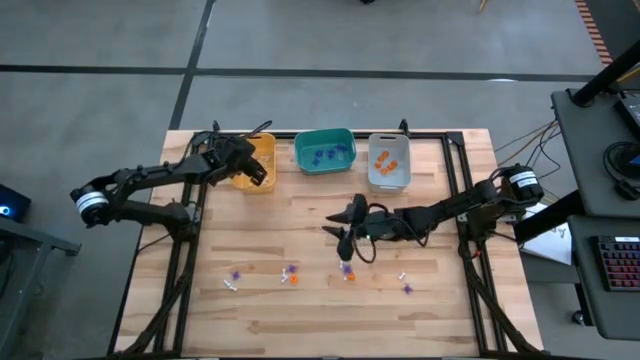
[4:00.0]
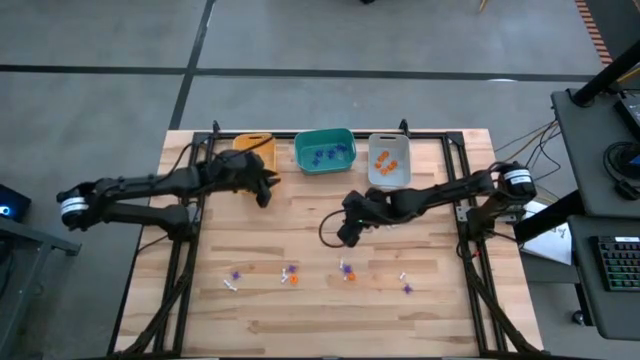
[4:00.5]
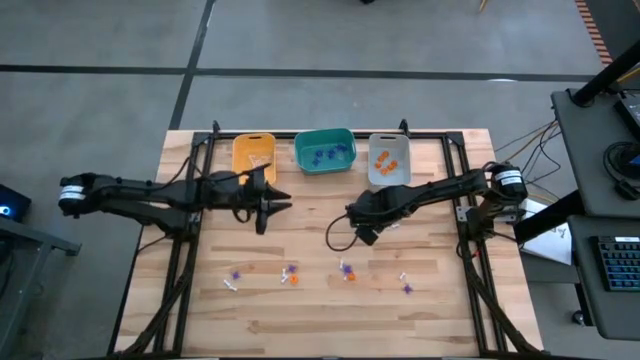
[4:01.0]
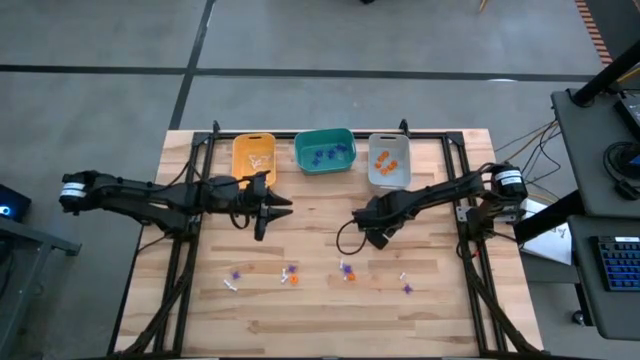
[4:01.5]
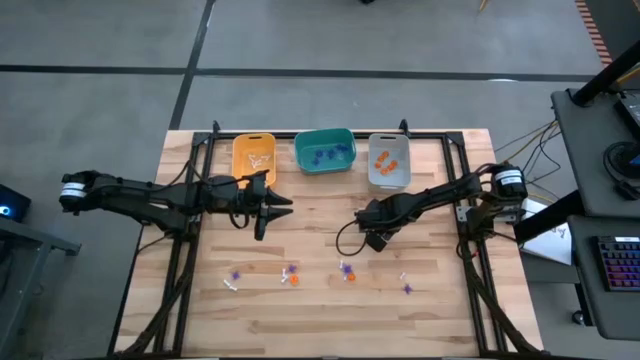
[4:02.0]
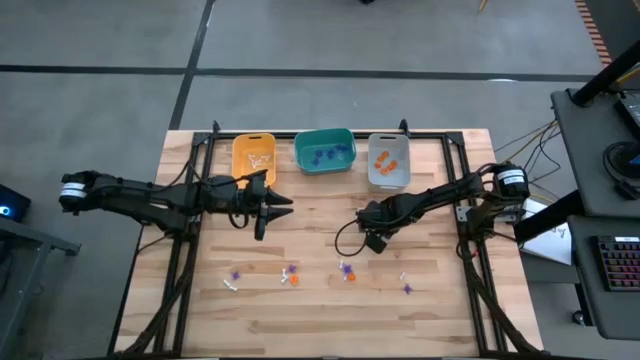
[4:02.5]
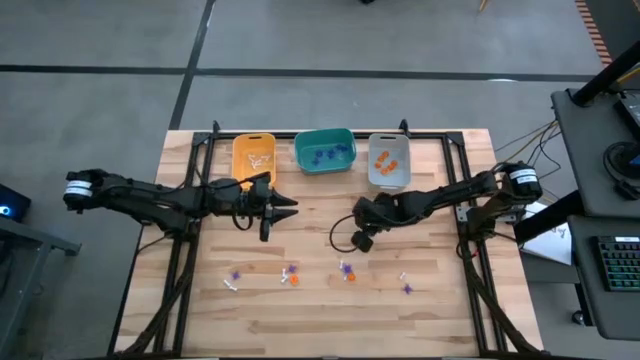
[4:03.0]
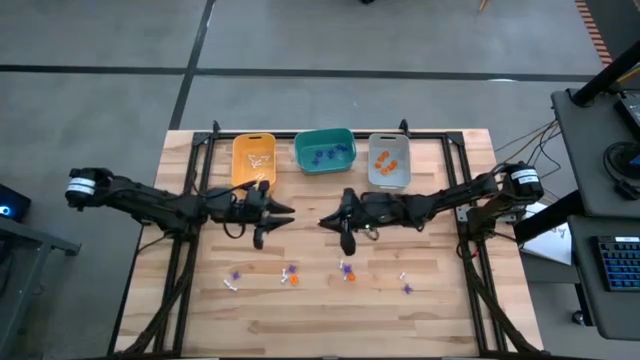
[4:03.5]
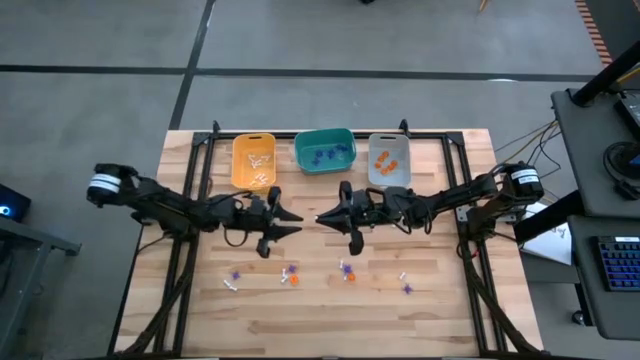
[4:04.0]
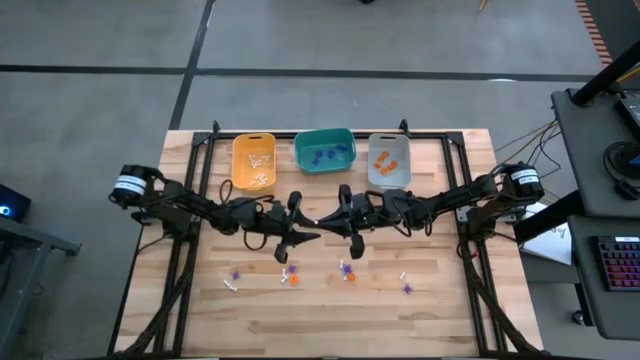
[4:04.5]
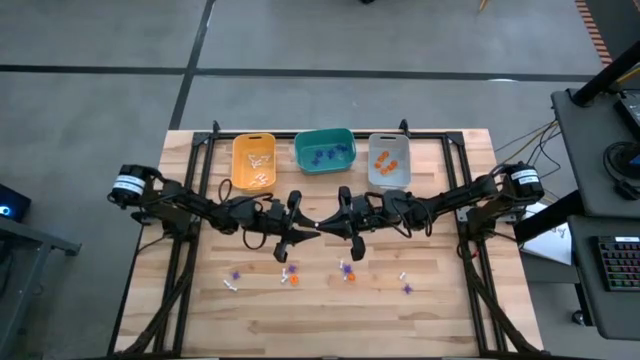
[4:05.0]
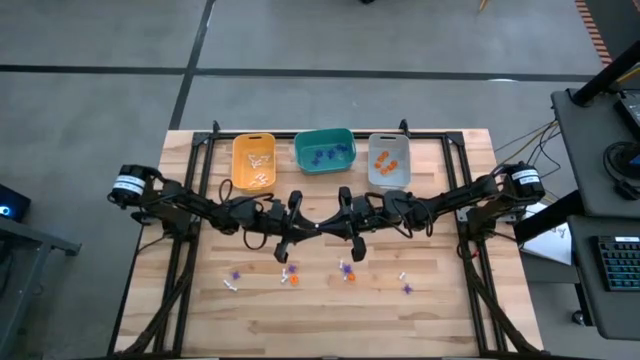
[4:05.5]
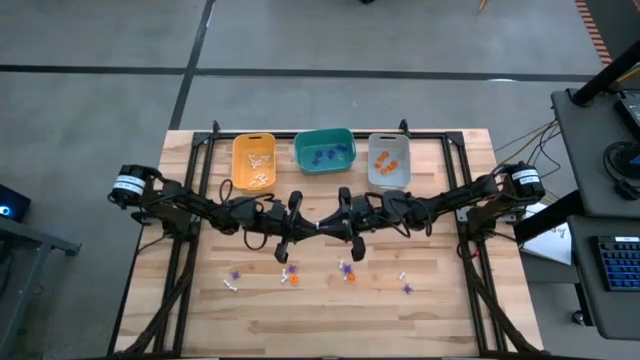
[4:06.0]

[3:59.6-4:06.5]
Task: Sort Halloween decoration
Put the white bone toy into the yellow bin

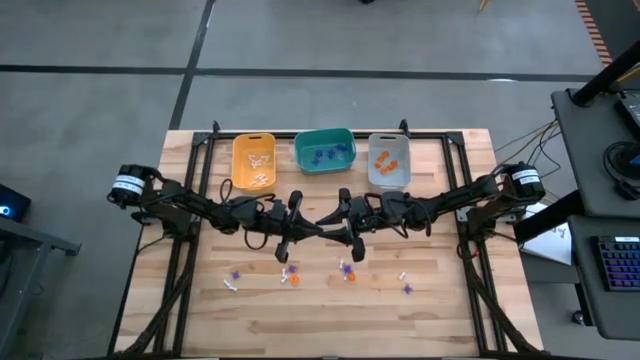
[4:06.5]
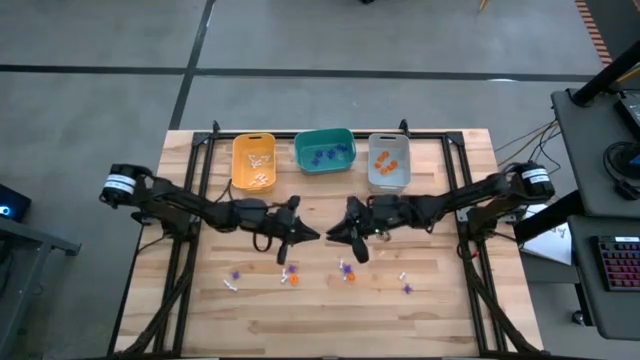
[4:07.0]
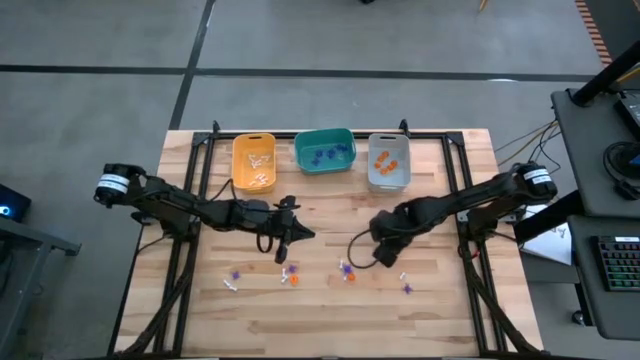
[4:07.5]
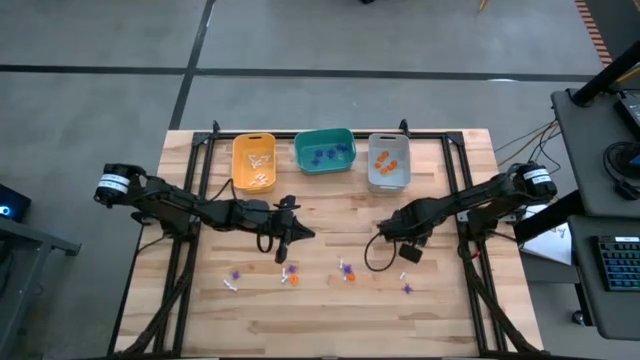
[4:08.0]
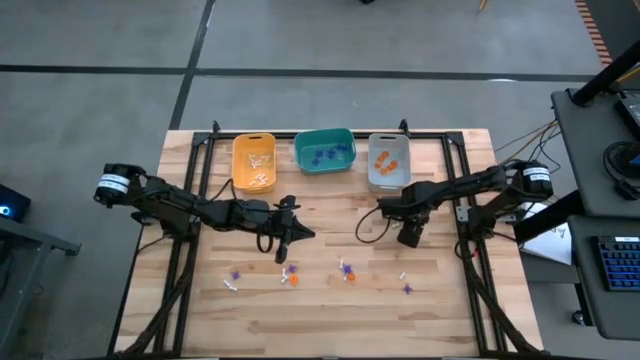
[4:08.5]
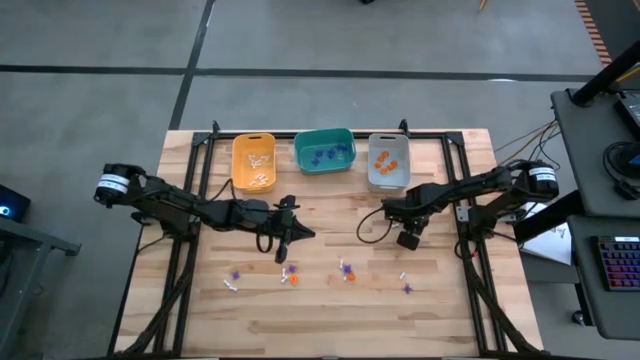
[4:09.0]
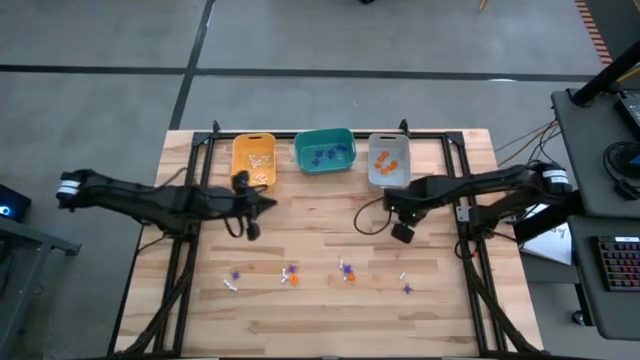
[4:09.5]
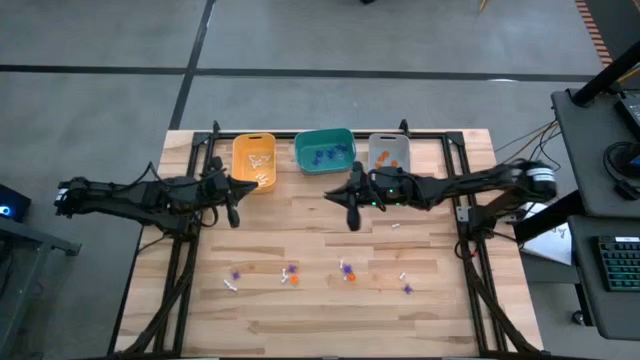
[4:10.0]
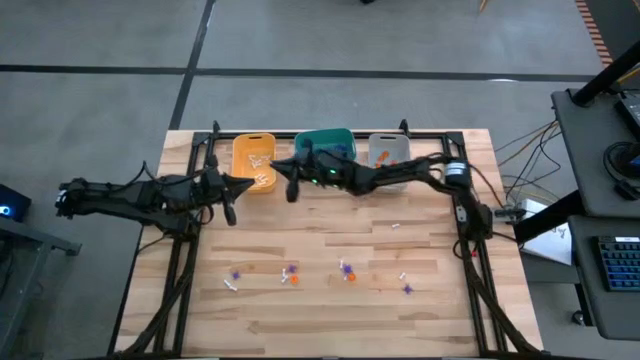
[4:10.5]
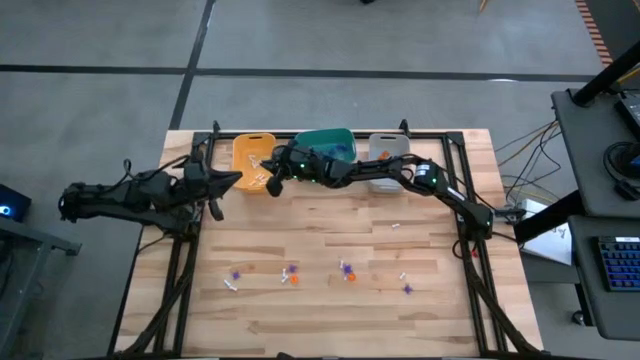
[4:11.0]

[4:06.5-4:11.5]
Put the white bone toy into the yellow bin

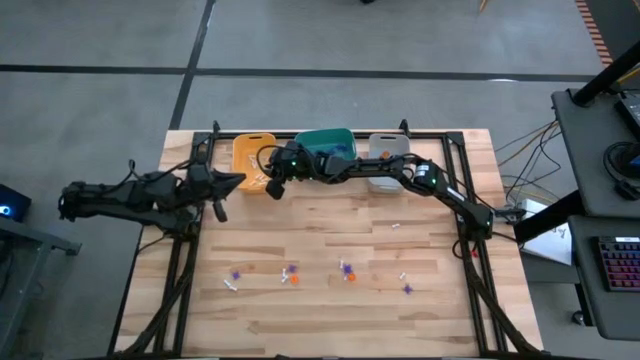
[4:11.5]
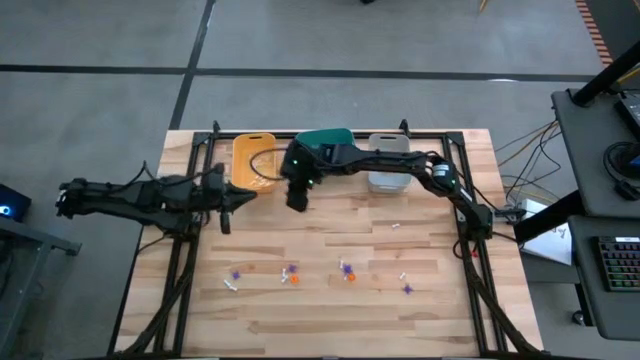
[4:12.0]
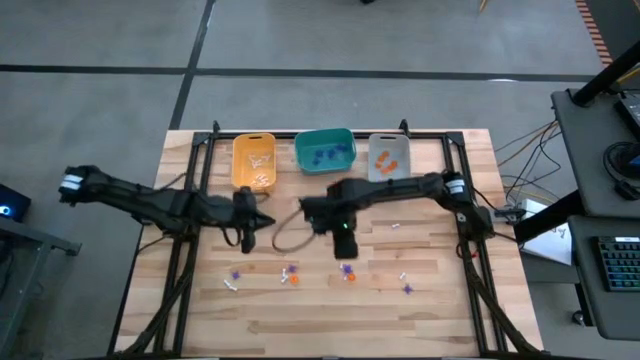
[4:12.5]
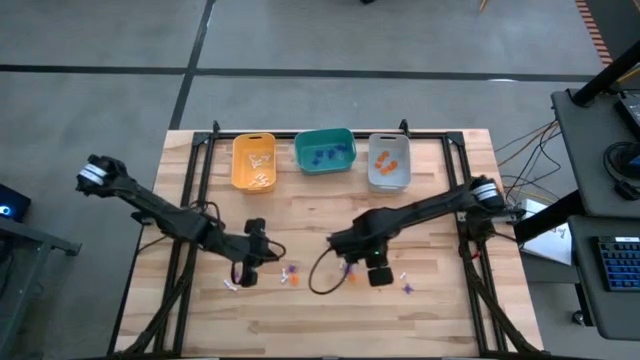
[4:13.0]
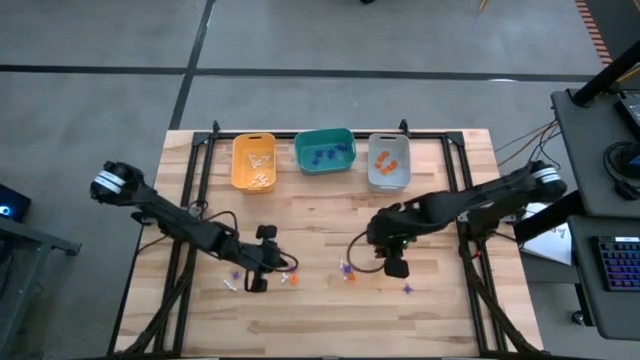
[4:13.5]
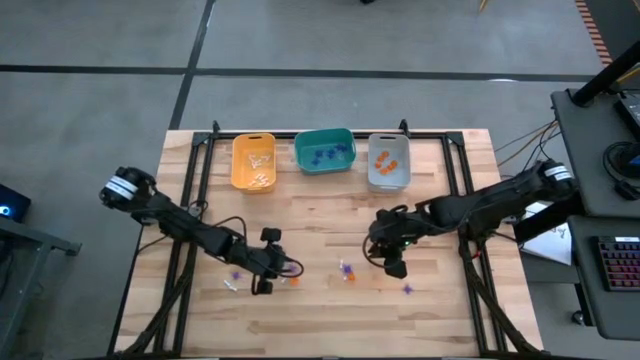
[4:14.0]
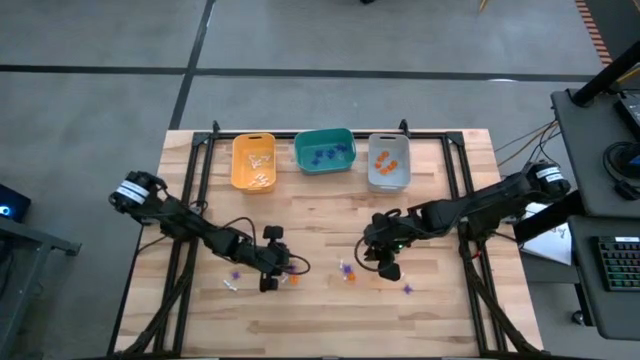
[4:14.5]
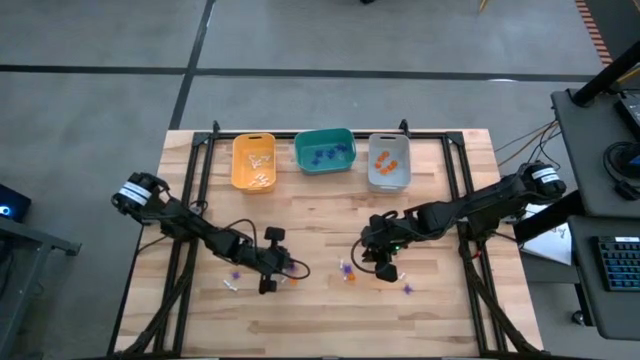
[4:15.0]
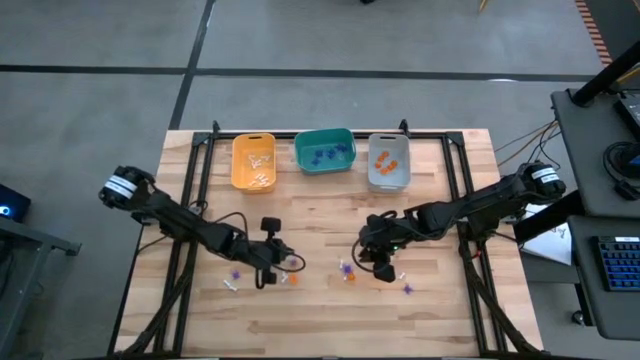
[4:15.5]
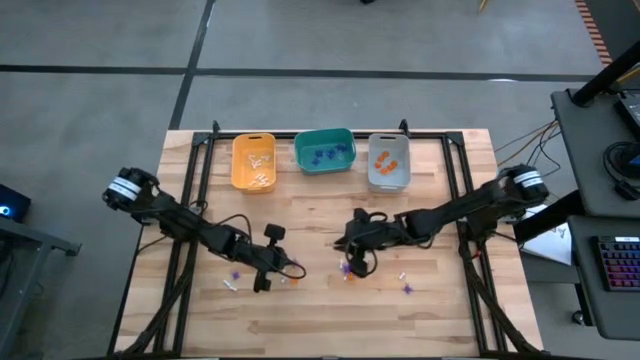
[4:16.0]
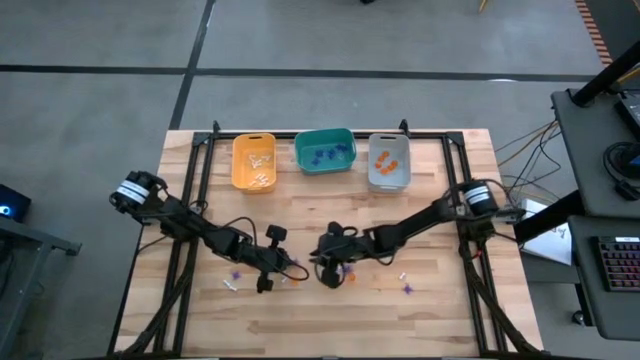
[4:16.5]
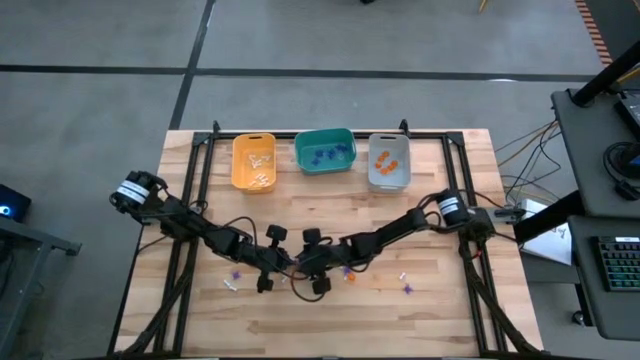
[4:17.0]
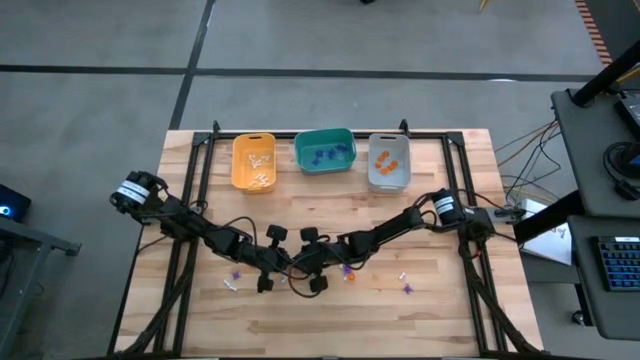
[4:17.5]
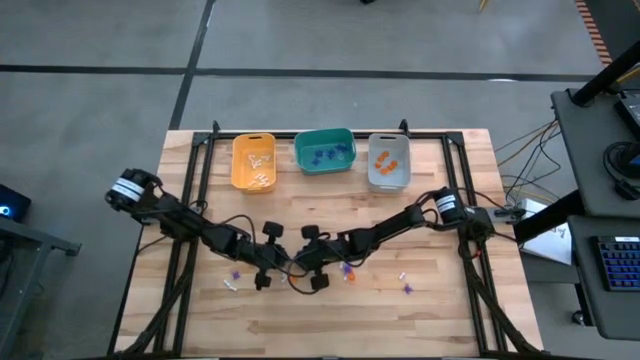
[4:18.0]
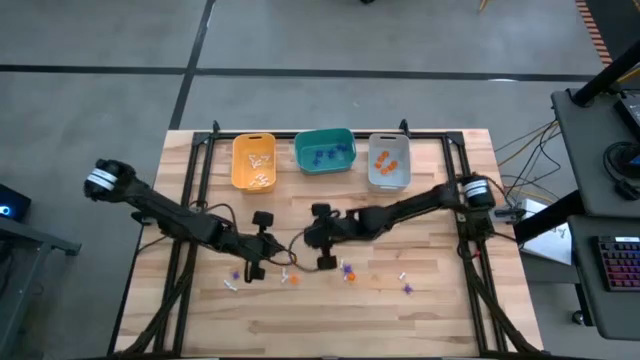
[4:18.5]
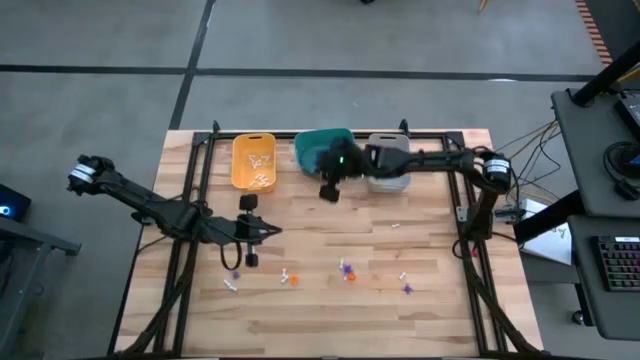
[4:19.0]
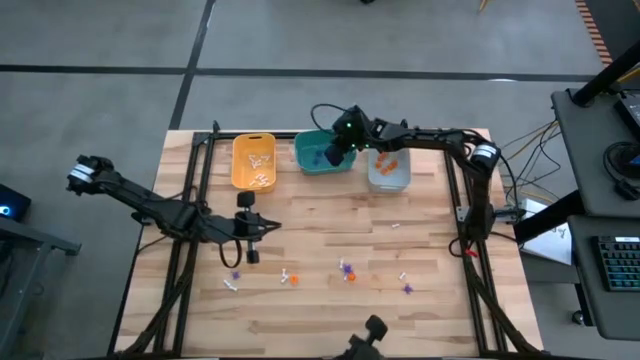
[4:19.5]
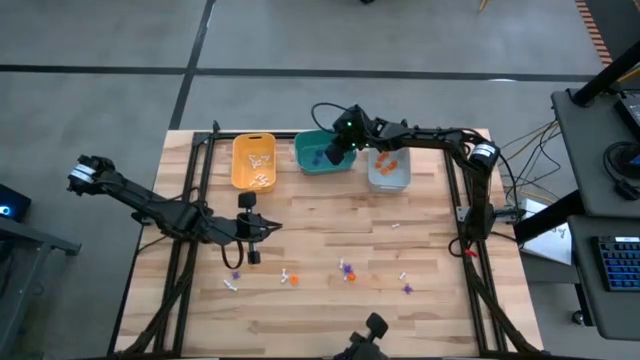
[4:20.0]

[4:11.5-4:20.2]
Put the violet spider toy into the green bin
